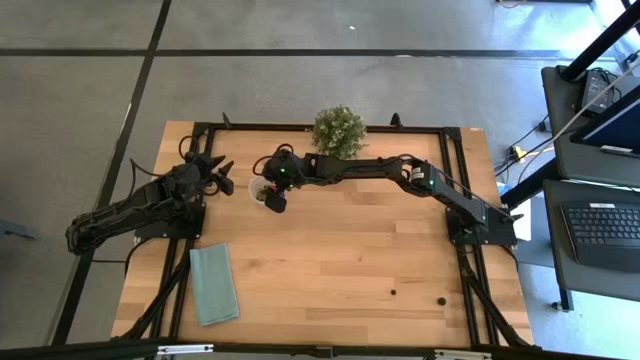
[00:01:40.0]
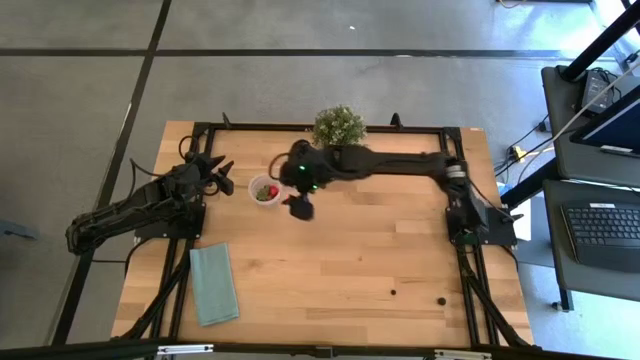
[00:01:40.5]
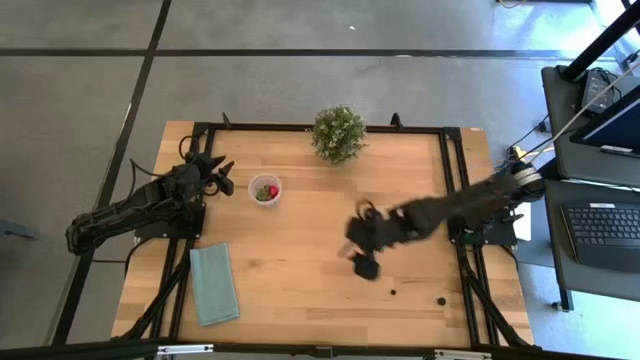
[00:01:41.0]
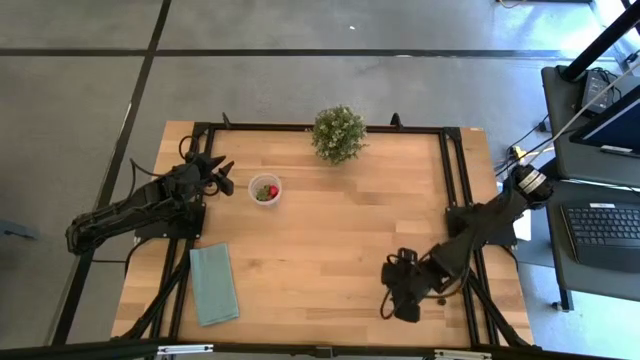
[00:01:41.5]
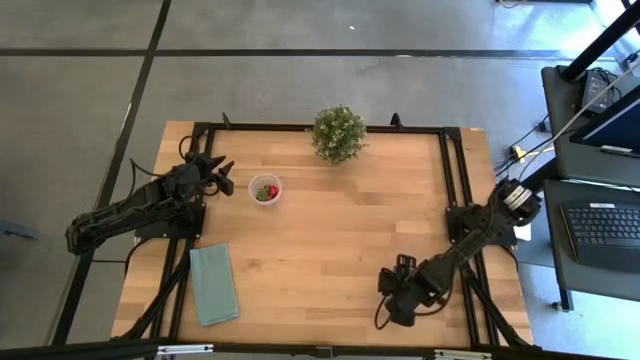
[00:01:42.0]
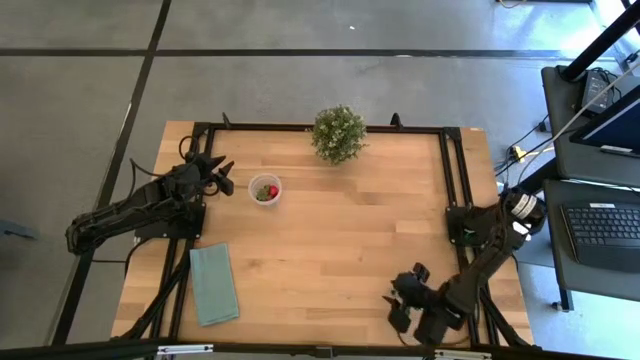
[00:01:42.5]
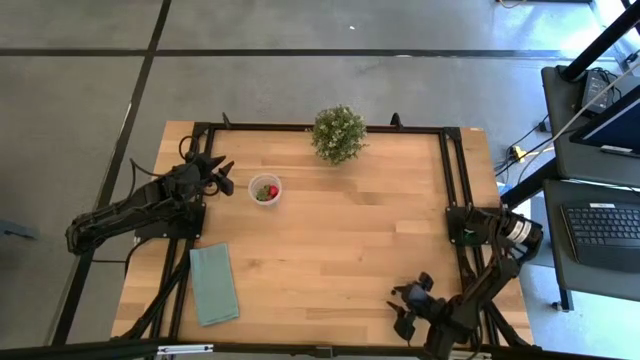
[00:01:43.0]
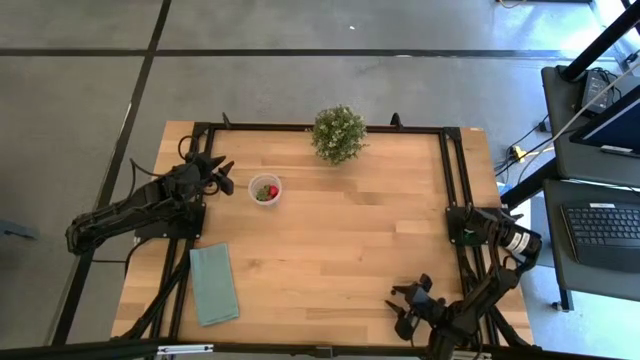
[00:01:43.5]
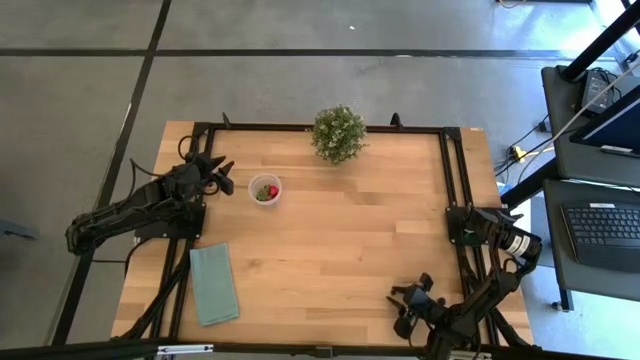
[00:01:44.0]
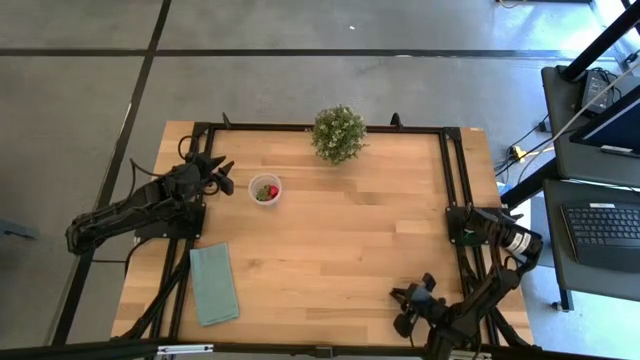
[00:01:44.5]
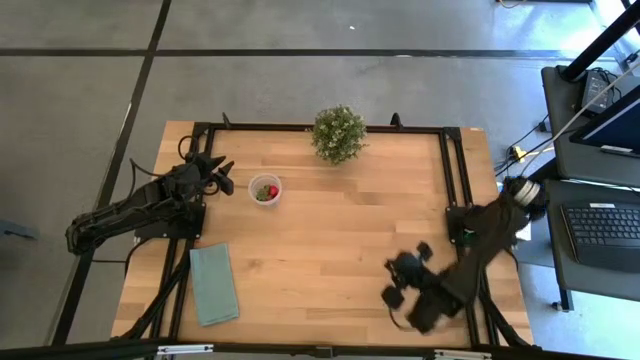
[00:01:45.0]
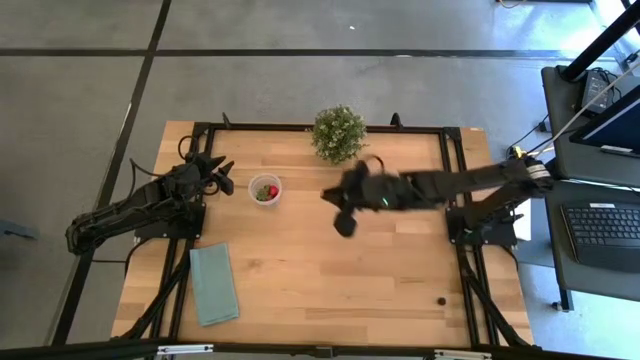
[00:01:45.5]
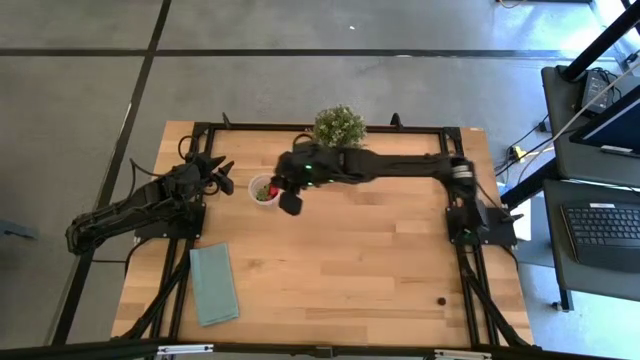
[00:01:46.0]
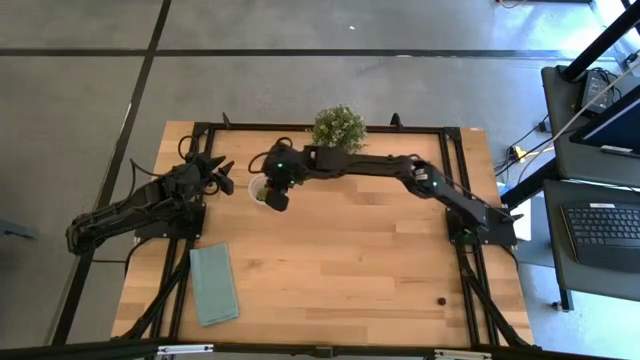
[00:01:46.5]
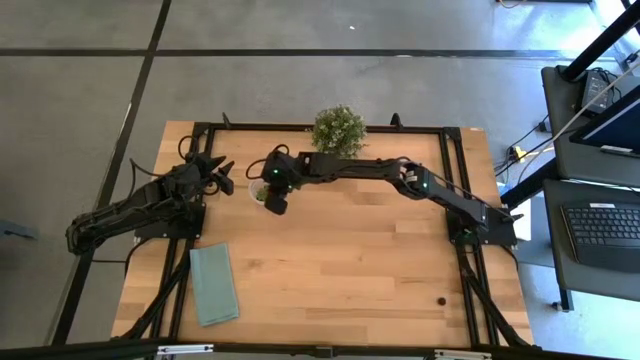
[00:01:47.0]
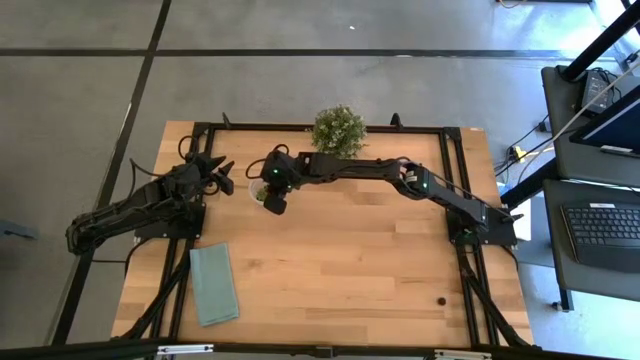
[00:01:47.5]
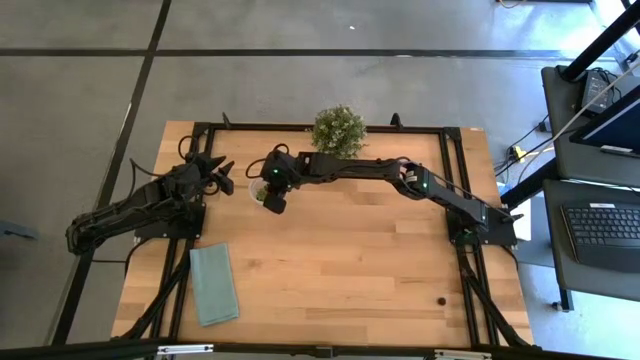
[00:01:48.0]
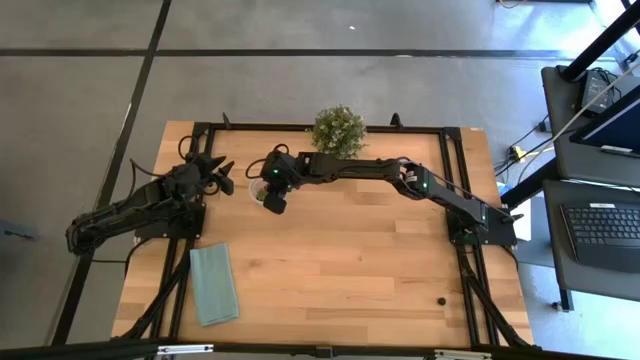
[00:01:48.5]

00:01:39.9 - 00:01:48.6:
Task: Pick and placing Produce into tupperware
Put the blueberry into the transparent container

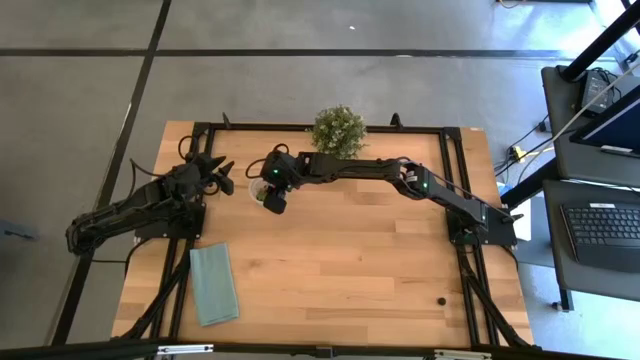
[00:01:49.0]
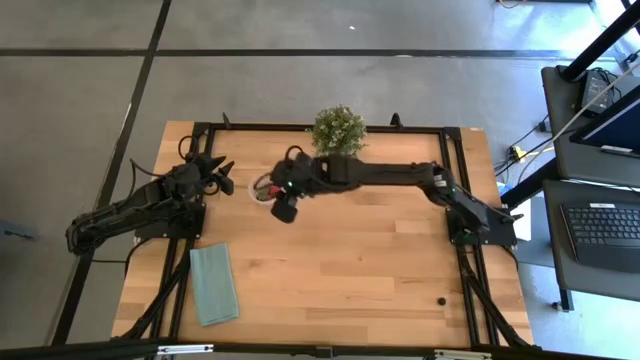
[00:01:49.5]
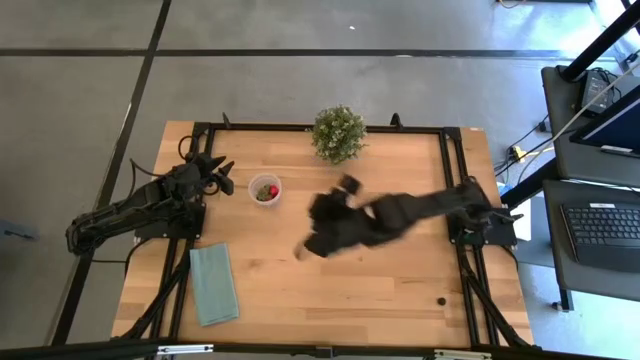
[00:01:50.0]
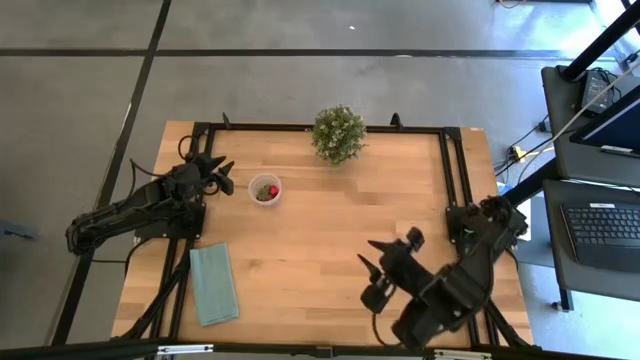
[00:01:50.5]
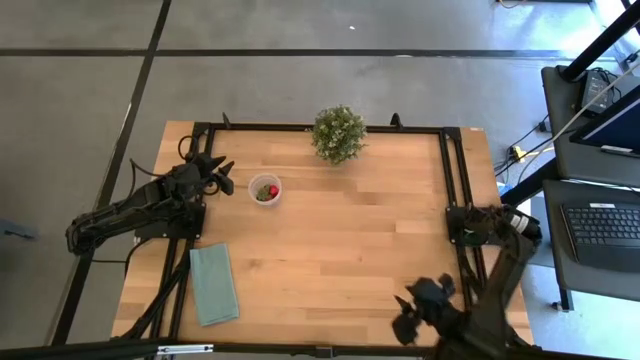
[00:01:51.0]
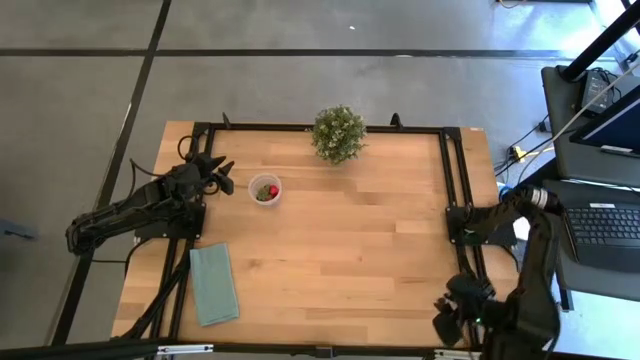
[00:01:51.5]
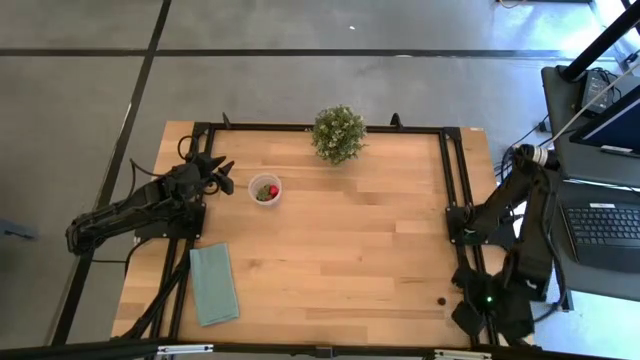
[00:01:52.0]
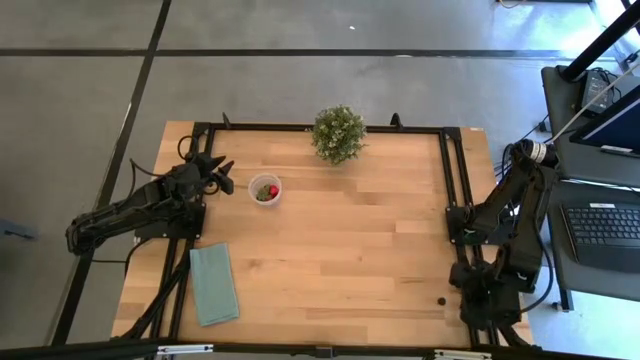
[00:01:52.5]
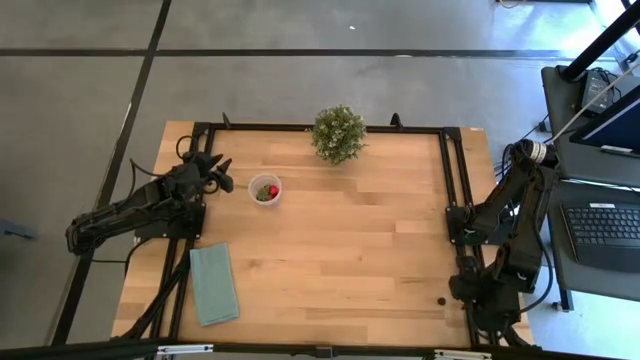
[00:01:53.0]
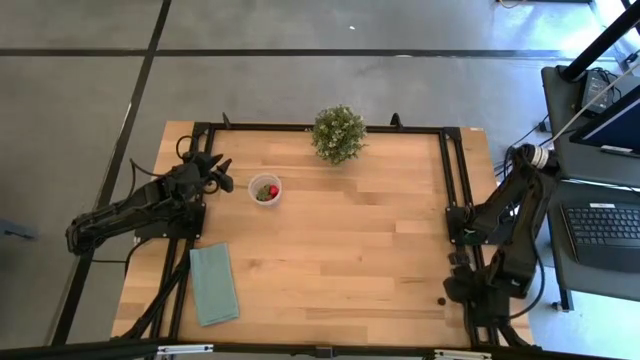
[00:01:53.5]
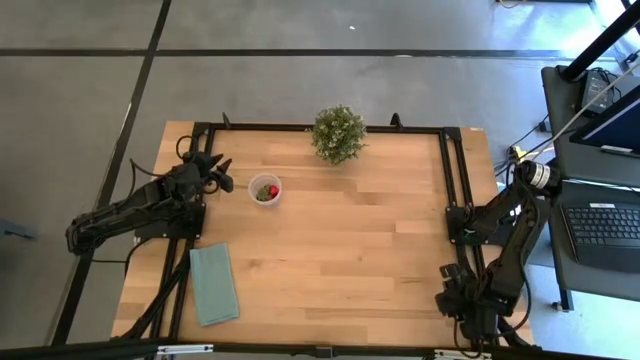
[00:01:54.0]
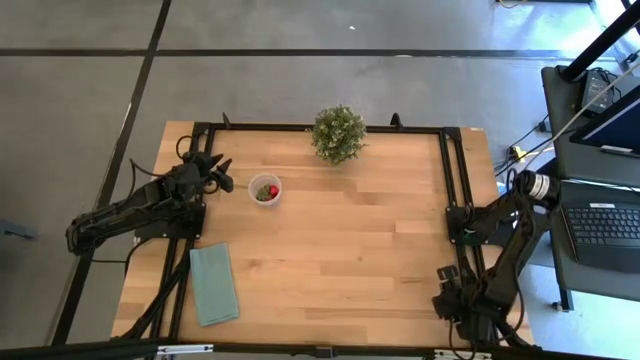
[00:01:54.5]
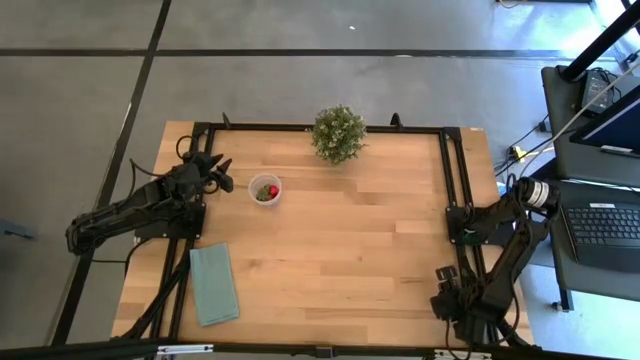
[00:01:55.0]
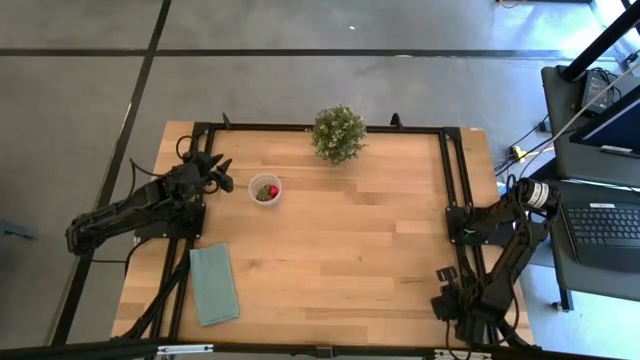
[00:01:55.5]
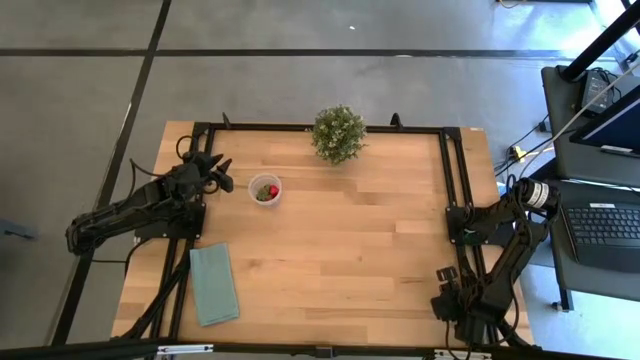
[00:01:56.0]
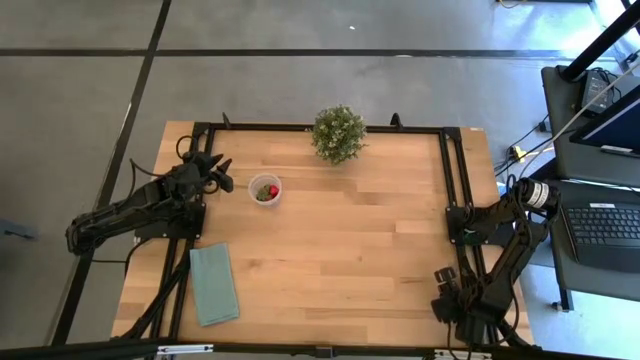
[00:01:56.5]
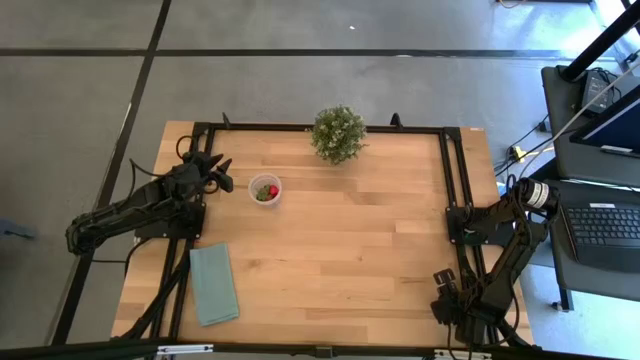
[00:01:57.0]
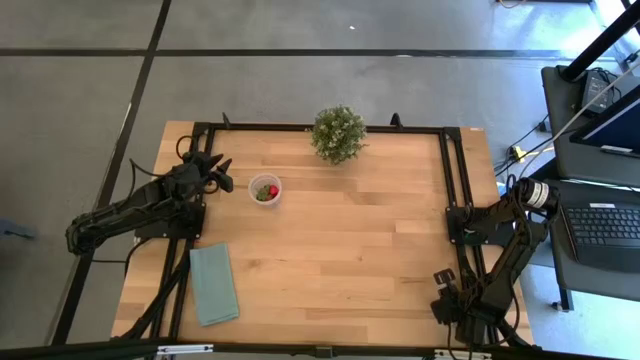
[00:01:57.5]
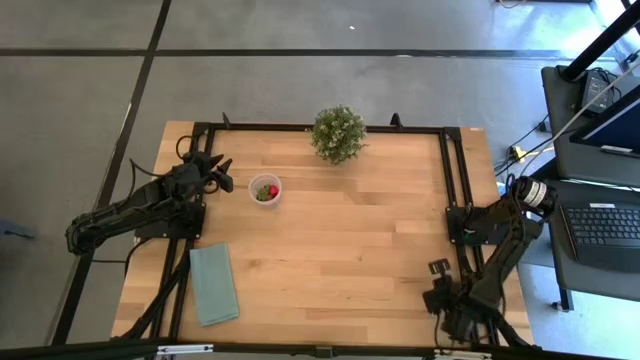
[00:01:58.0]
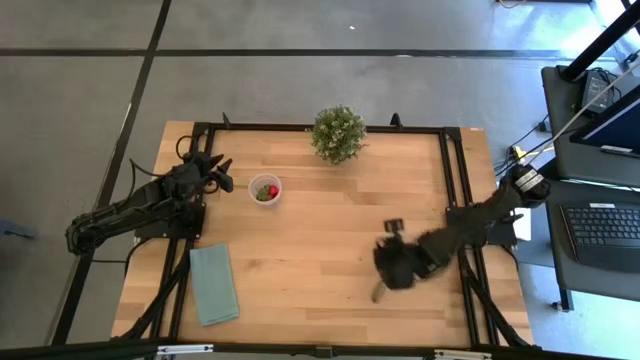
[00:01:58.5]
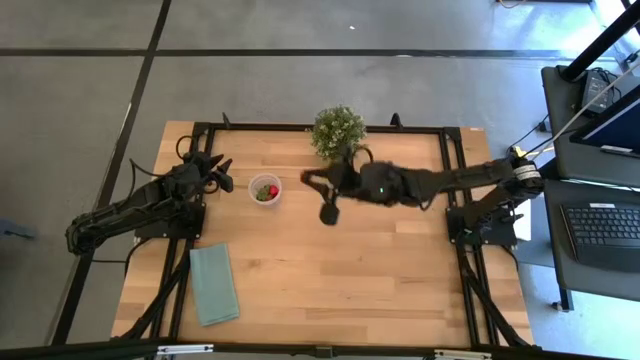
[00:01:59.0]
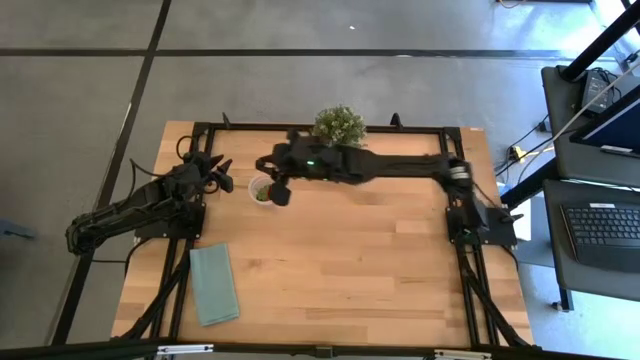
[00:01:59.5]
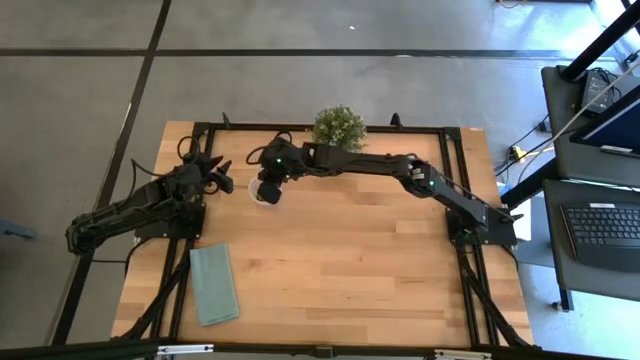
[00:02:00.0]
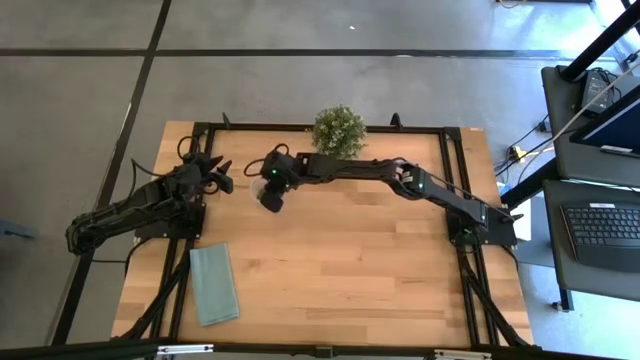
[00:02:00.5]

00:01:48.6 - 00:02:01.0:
Put the blackberry into the transparent container
